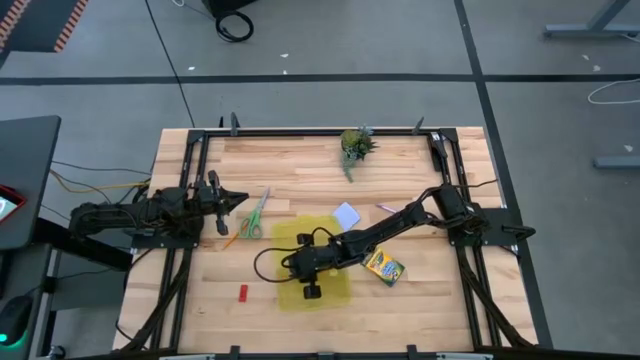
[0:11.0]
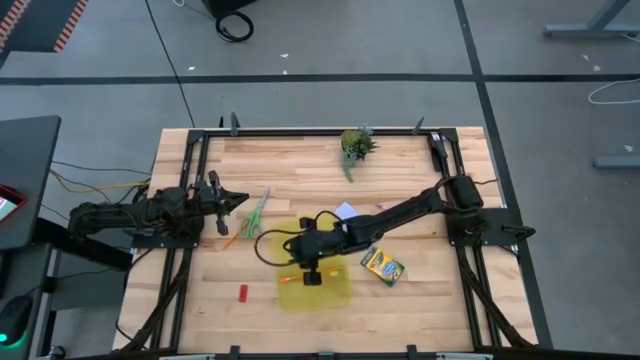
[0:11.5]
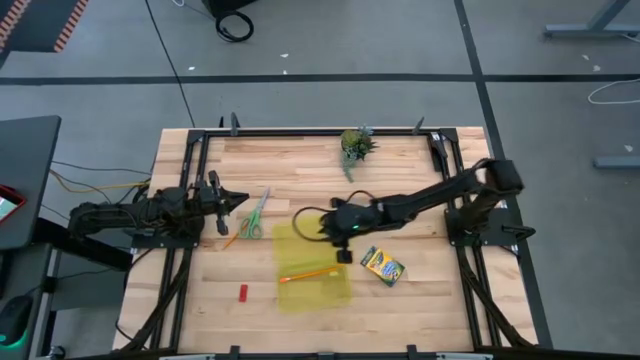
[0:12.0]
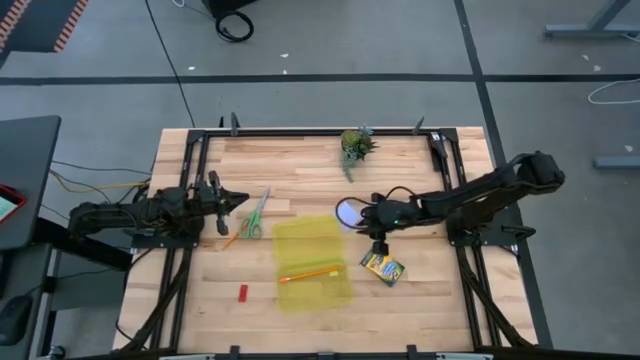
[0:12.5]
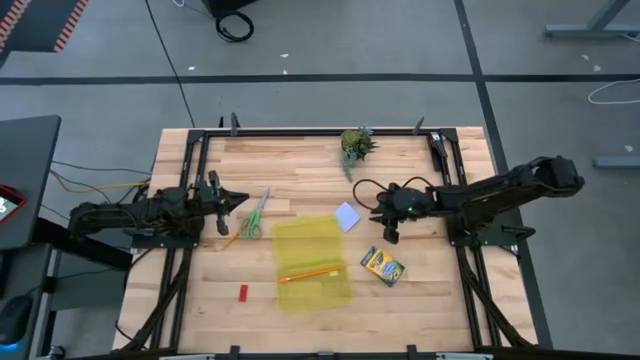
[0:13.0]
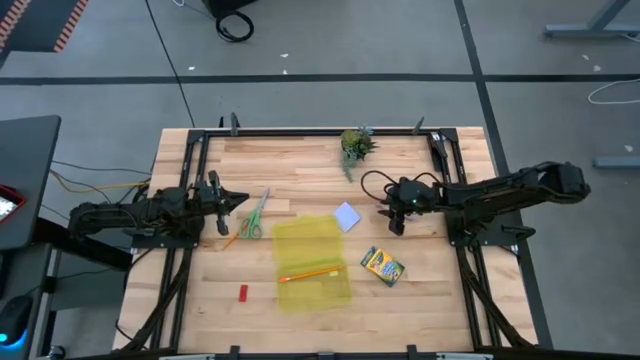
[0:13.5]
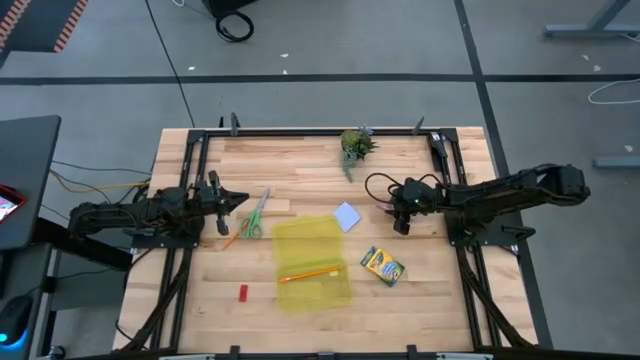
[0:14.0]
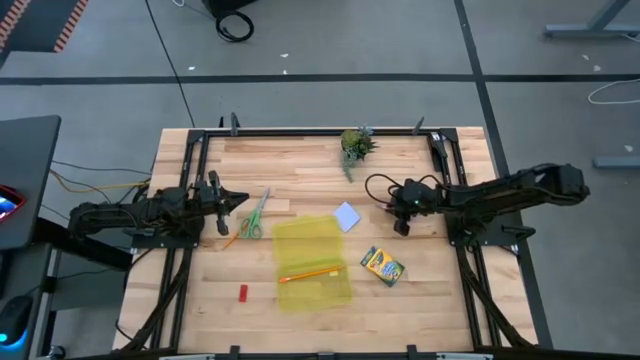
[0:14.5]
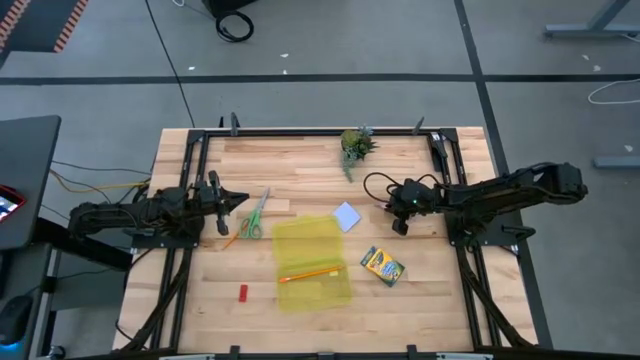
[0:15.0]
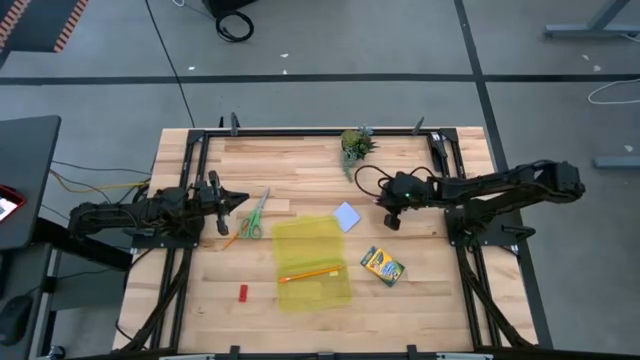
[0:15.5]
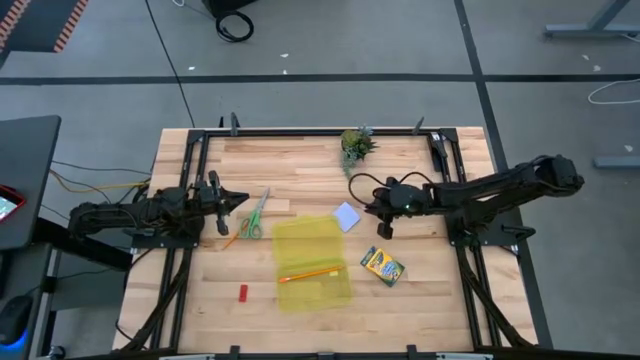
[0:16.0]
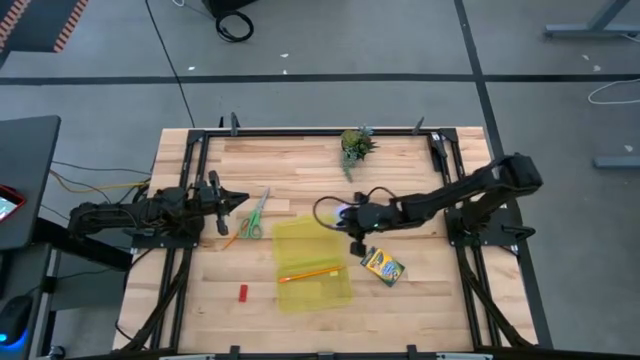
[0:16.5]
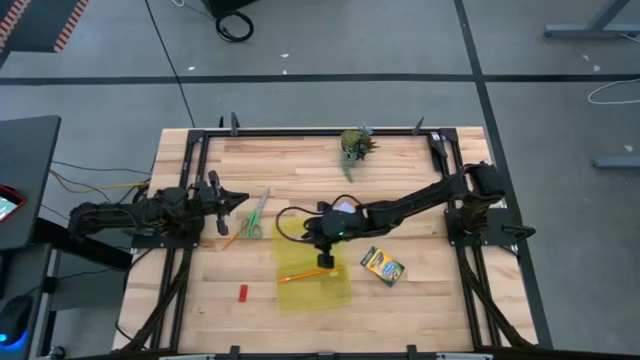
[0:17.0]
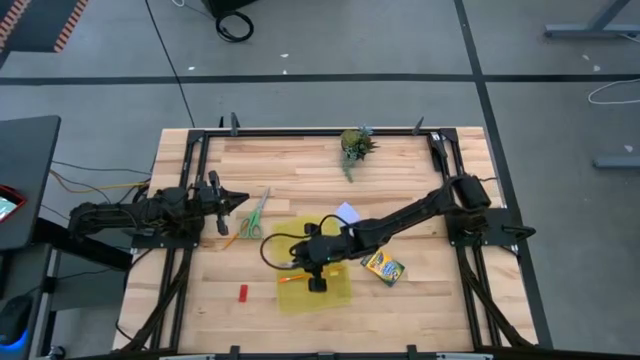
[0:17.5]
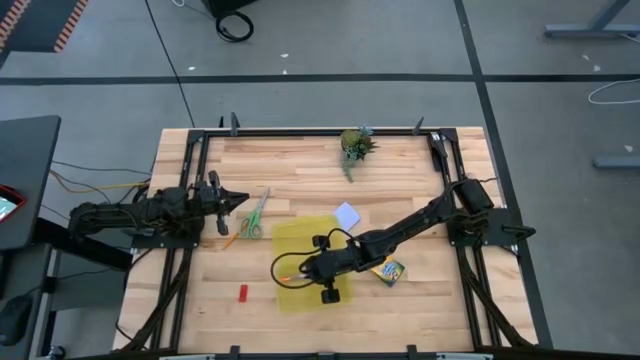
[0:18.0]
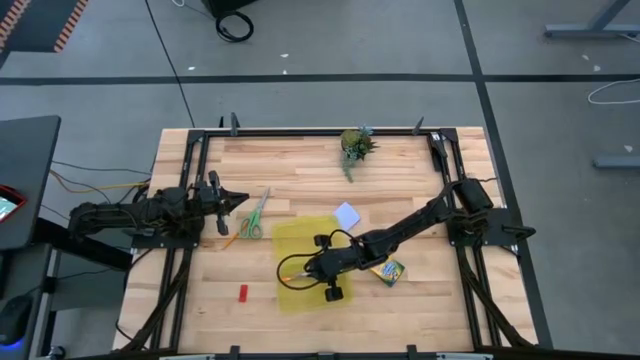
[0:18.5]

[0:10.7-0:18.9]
Task: Pack school essentials
Put the violet pen into the yellow supply box

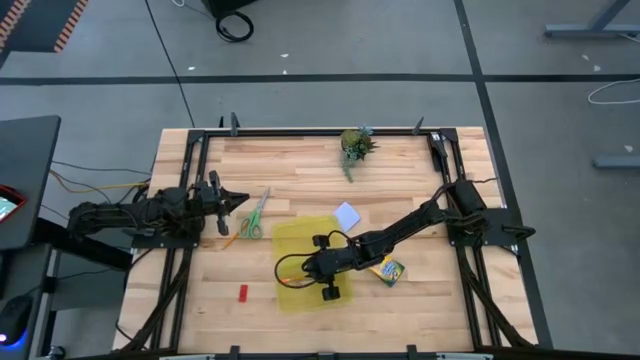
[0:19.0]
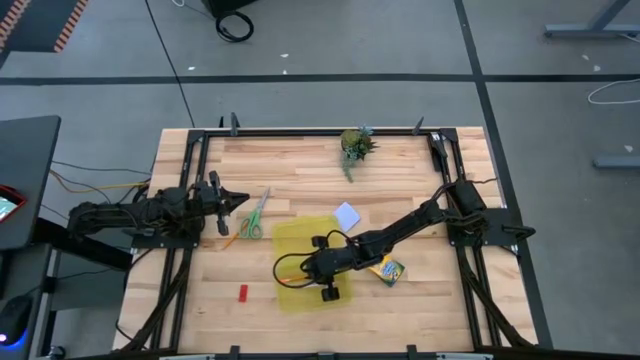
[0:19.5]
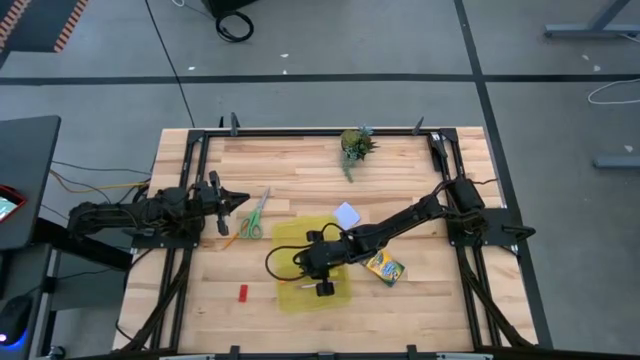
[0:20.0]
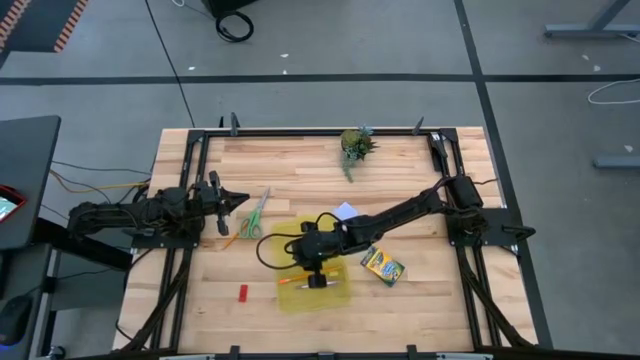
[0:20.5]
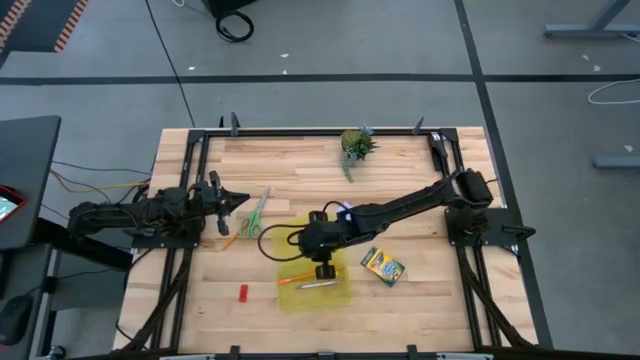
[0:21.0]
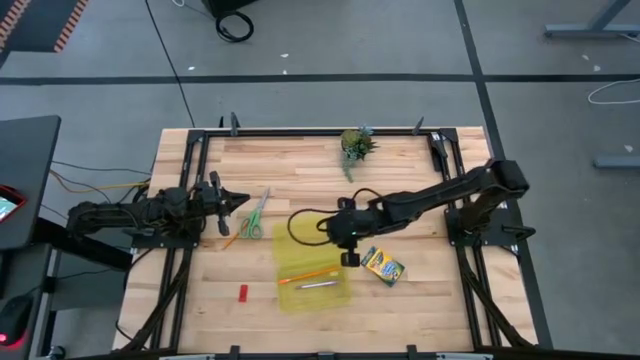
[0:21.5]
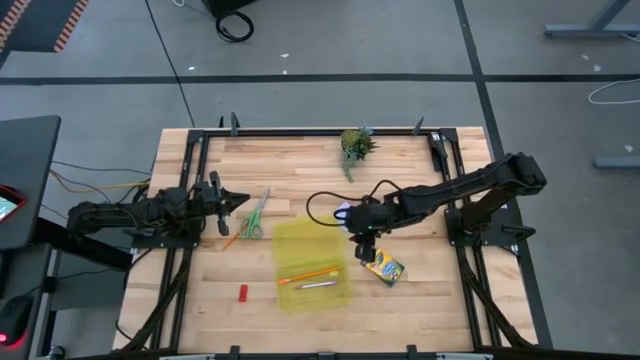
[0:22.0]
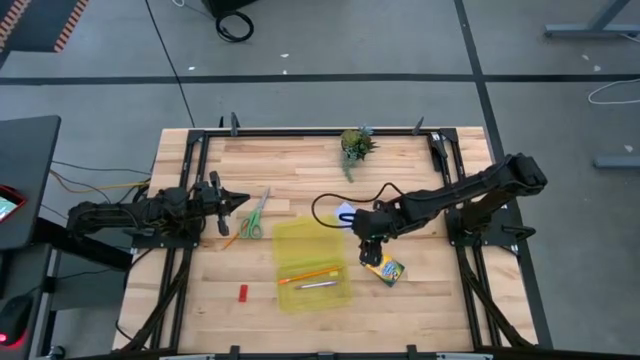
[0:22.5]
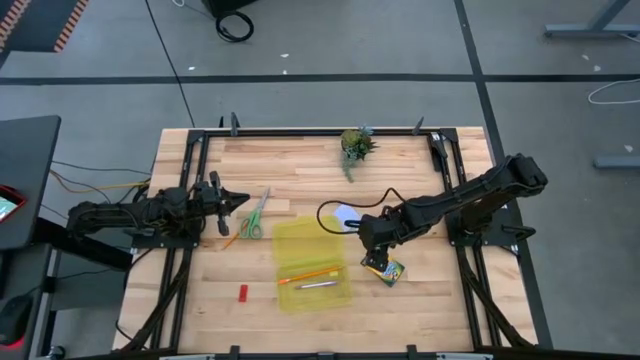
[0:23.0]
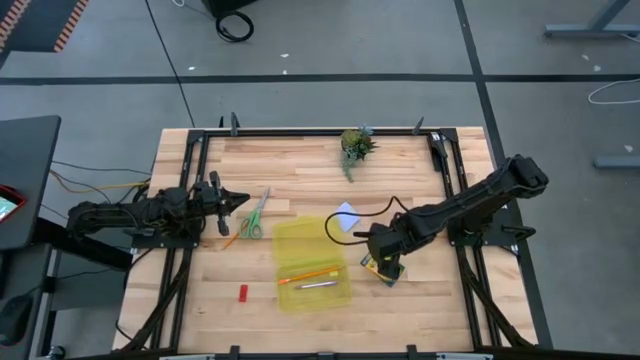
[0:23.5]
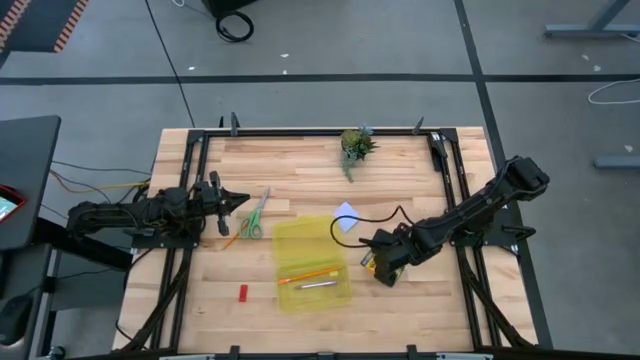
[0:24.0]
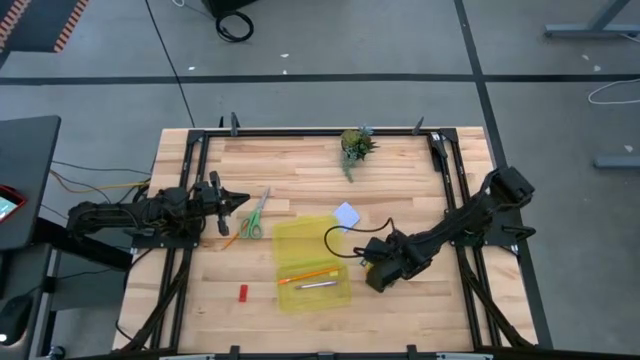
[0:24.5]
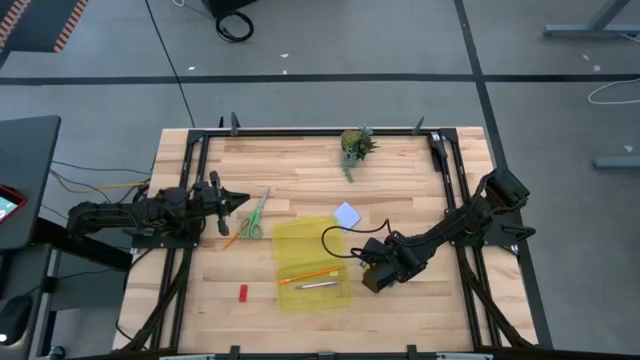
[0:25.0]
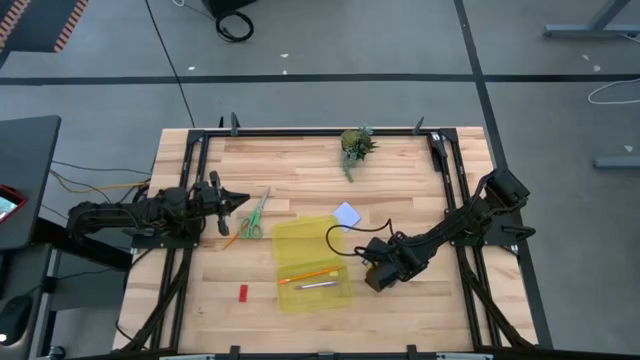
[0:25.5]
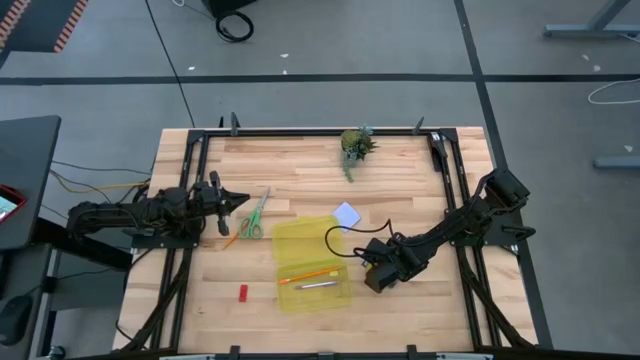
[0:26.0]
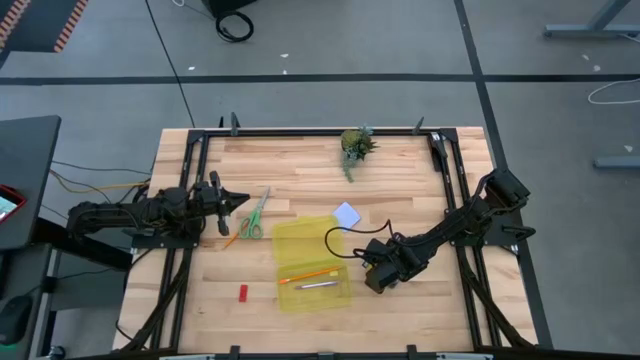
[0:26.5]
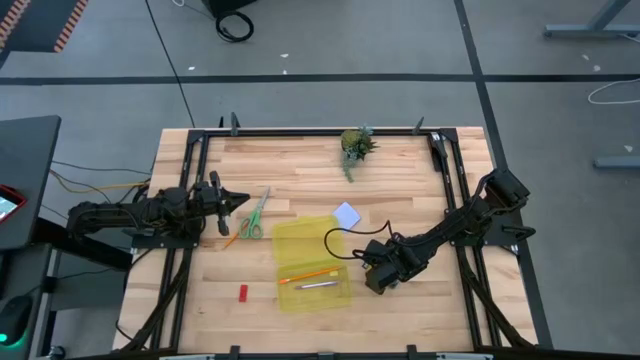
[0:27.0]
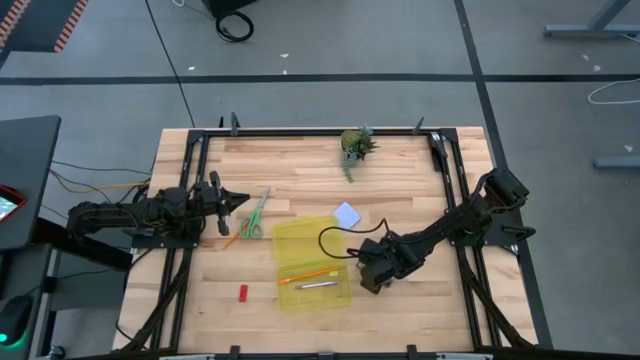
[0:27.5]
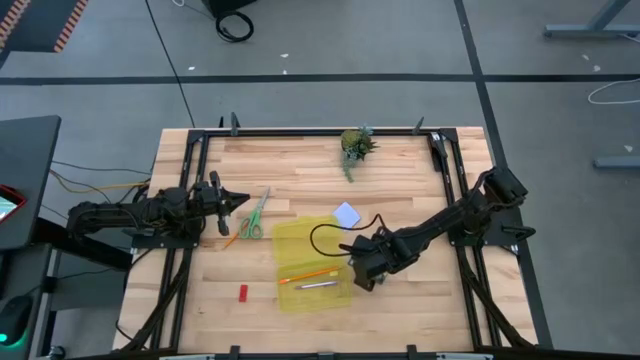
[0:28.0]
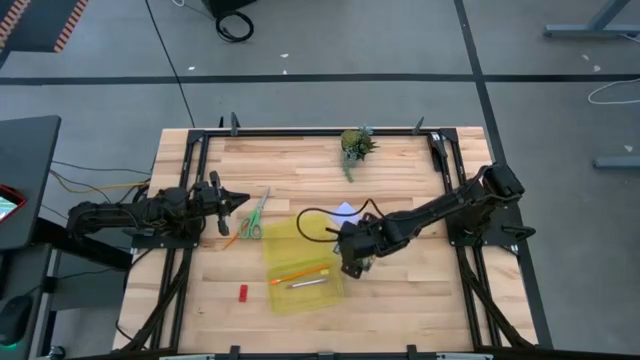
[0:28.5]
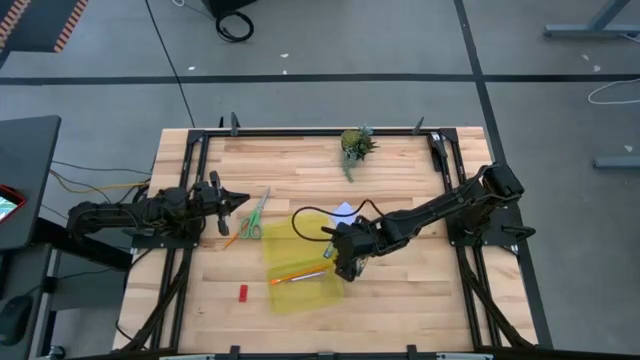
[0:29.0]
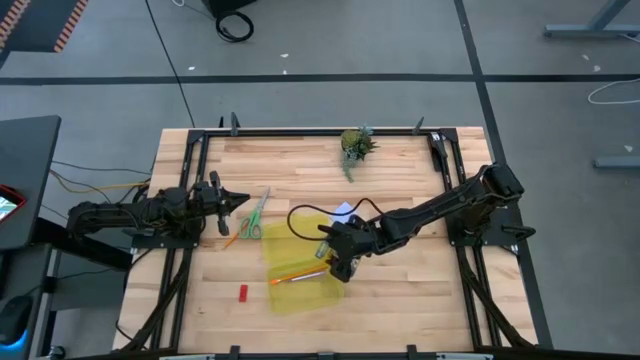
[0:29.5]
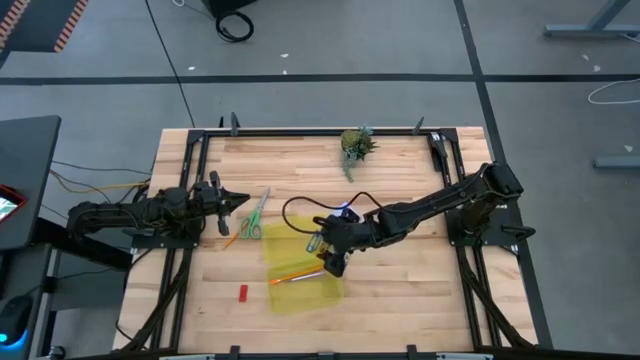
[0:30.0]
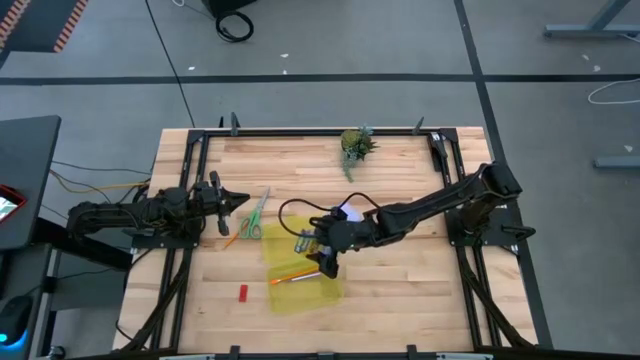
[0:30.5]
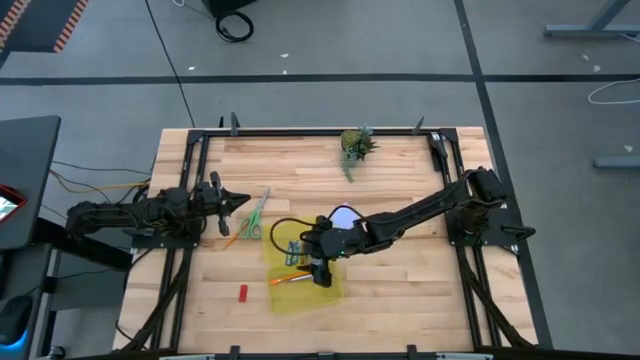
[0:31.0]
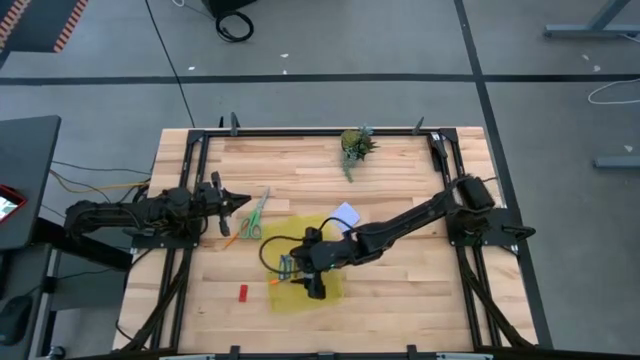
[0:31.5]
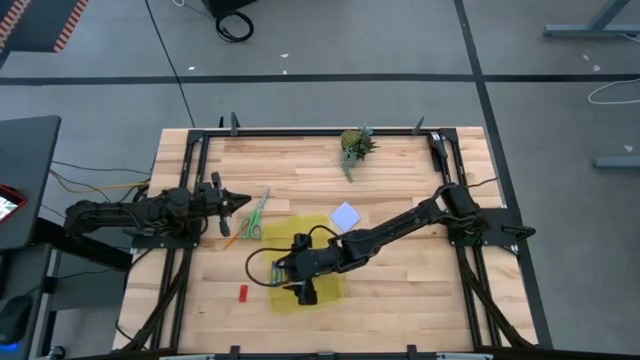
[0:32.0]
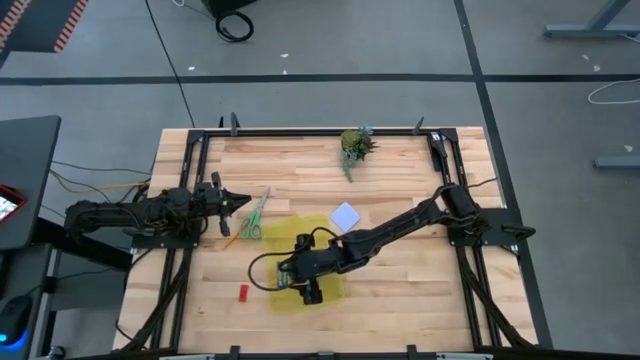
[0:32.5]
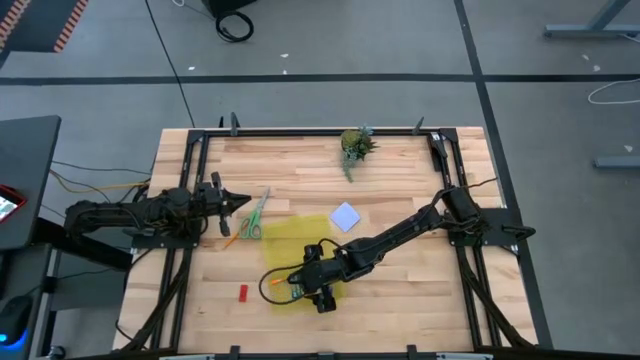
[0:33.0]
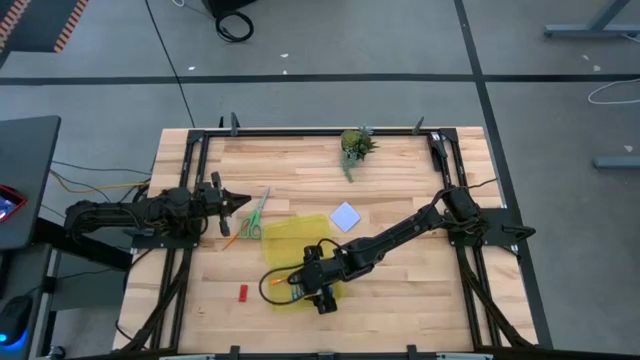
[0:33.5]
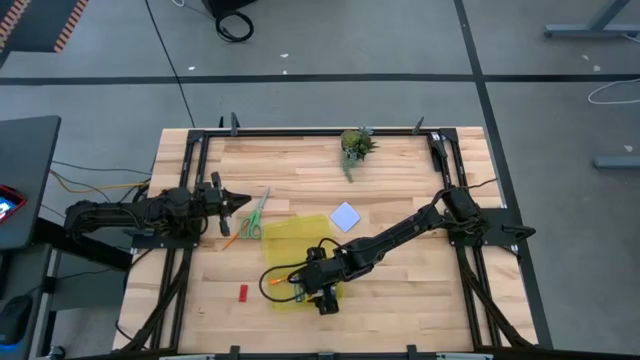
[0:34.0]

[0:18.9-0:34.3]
Put the yellow crayon box into the yellow supply box
